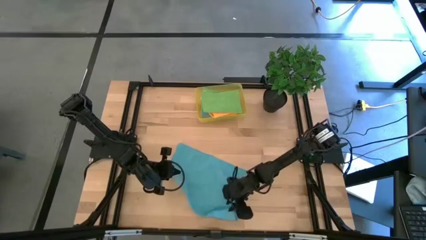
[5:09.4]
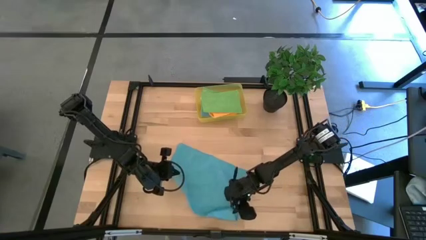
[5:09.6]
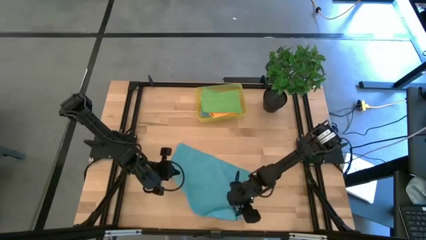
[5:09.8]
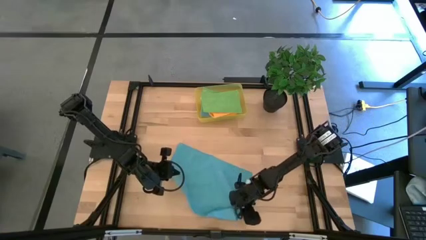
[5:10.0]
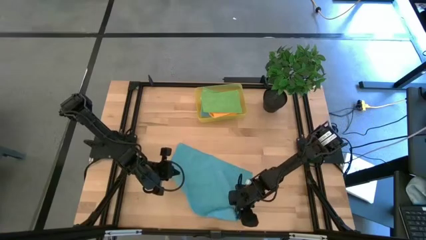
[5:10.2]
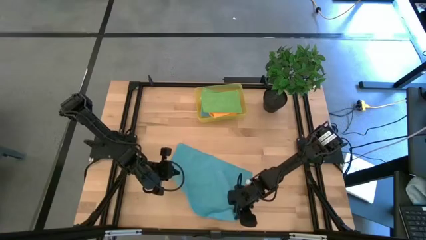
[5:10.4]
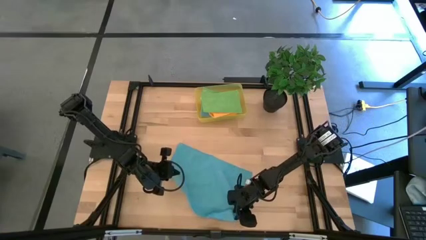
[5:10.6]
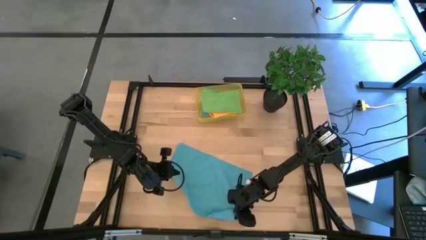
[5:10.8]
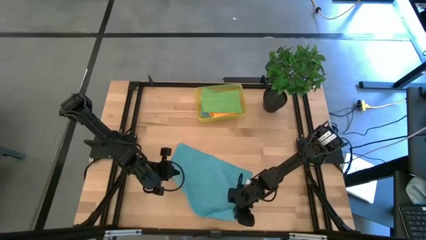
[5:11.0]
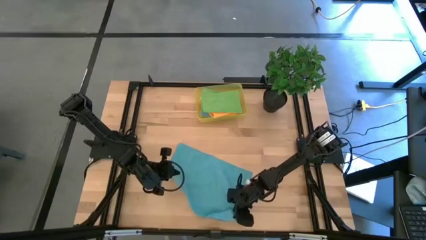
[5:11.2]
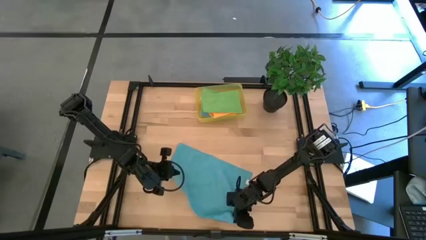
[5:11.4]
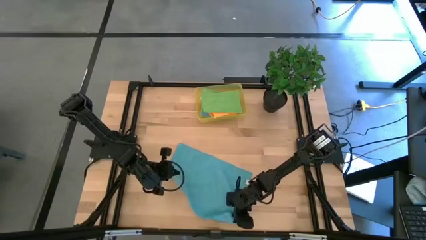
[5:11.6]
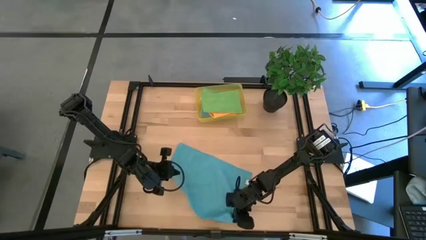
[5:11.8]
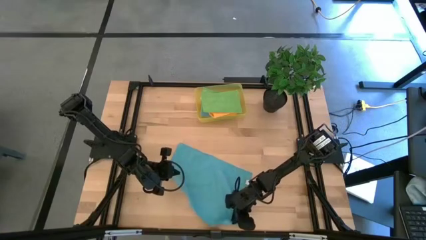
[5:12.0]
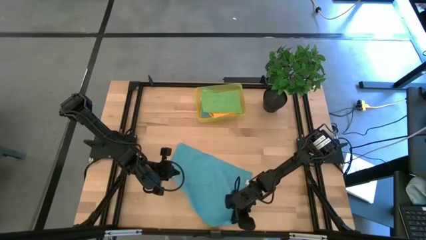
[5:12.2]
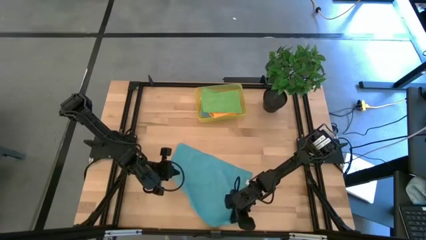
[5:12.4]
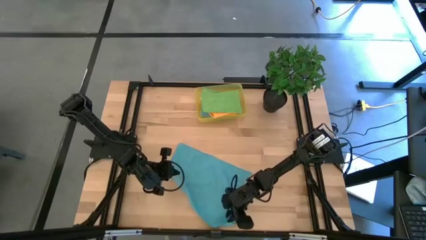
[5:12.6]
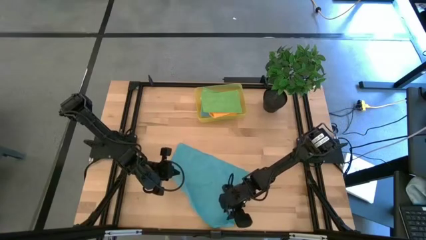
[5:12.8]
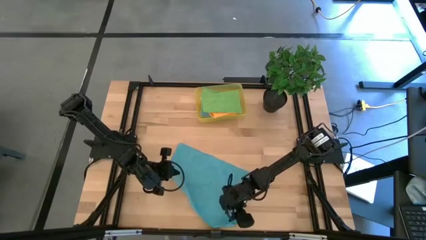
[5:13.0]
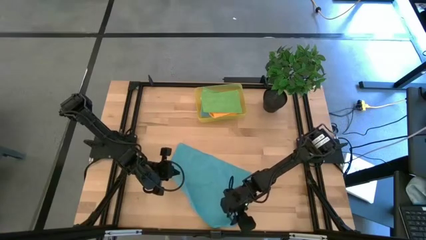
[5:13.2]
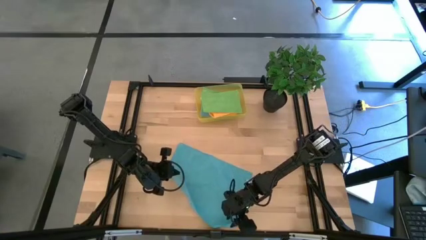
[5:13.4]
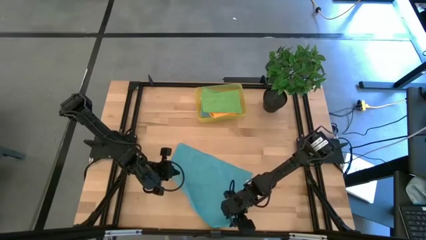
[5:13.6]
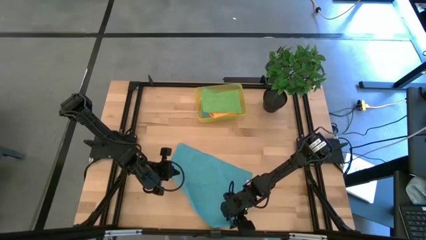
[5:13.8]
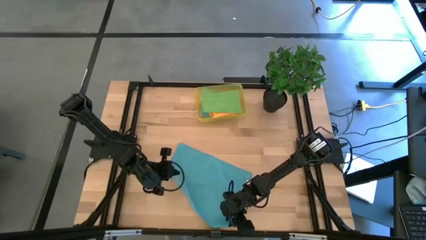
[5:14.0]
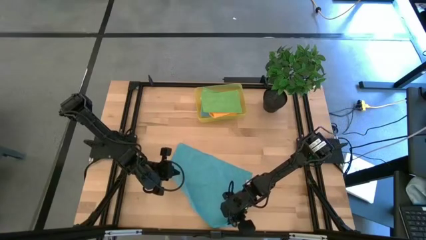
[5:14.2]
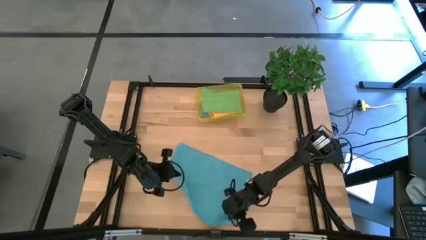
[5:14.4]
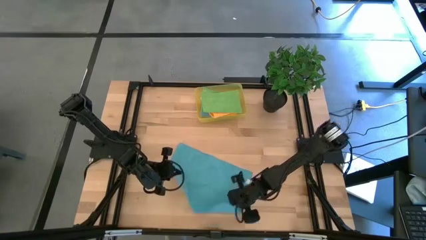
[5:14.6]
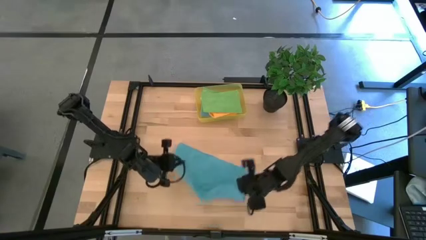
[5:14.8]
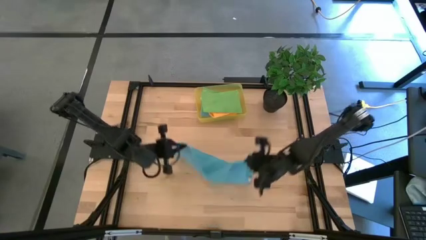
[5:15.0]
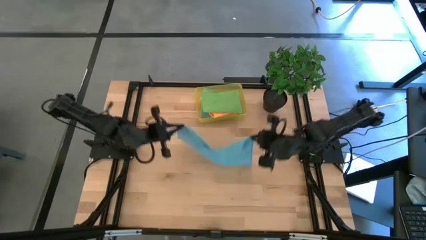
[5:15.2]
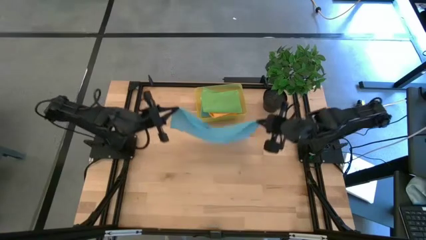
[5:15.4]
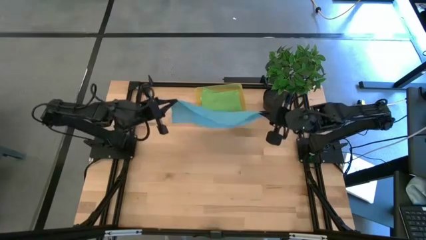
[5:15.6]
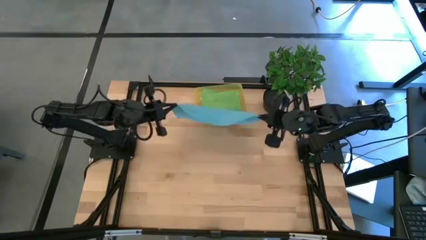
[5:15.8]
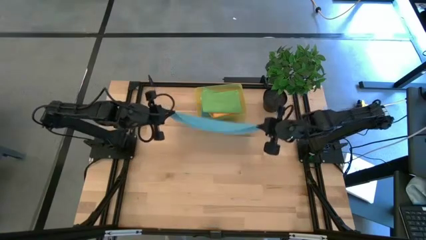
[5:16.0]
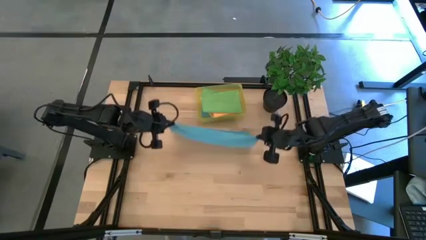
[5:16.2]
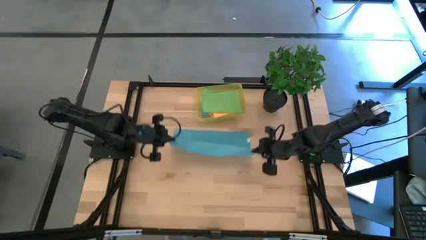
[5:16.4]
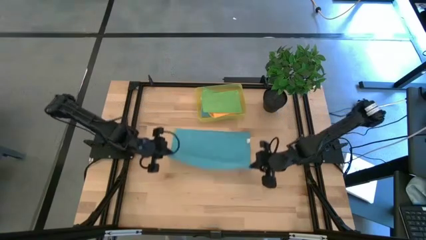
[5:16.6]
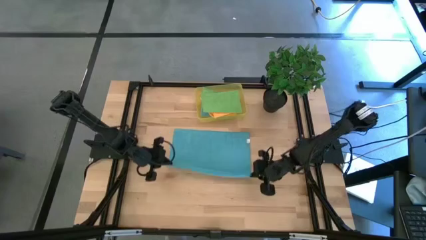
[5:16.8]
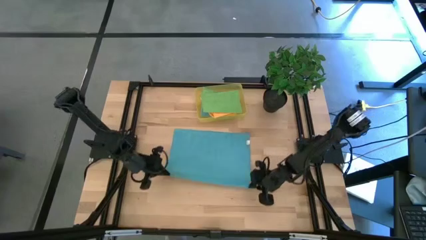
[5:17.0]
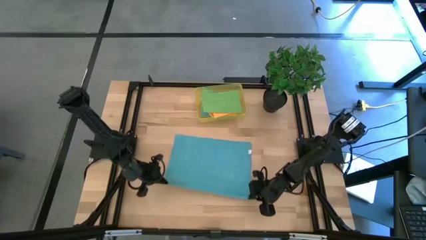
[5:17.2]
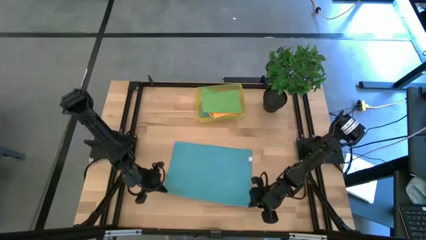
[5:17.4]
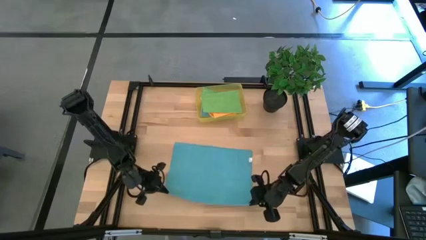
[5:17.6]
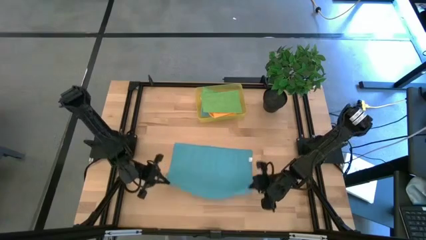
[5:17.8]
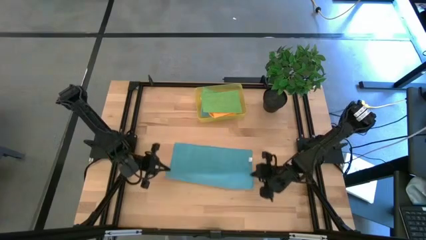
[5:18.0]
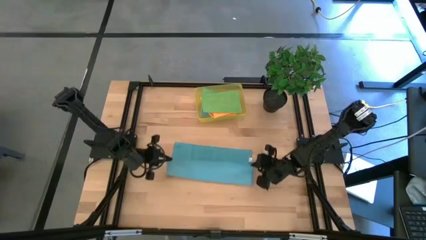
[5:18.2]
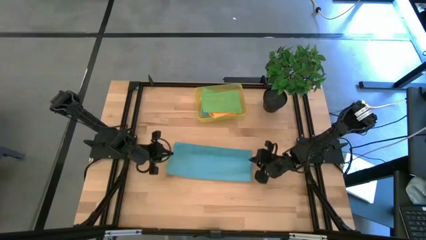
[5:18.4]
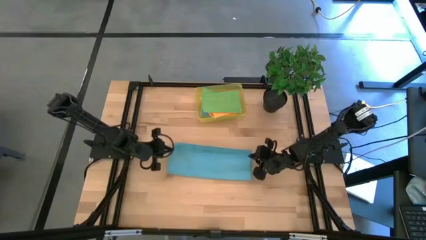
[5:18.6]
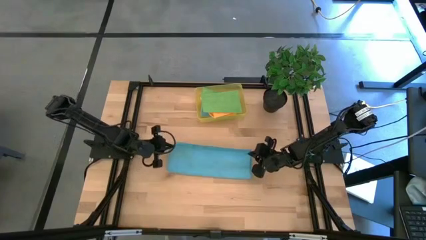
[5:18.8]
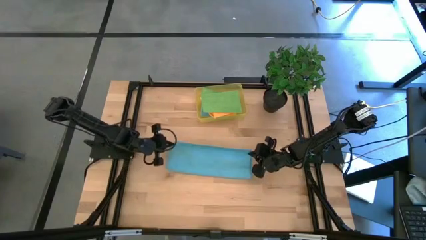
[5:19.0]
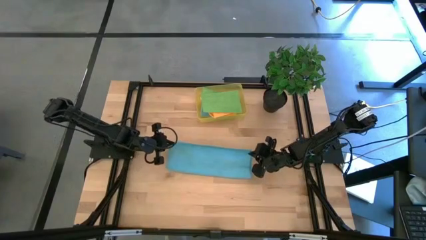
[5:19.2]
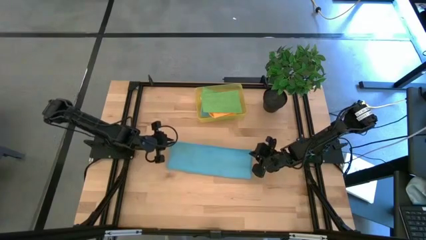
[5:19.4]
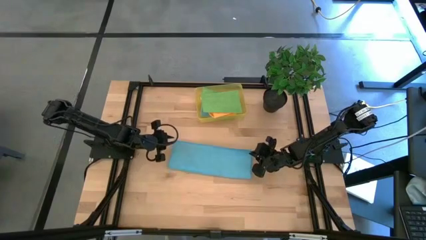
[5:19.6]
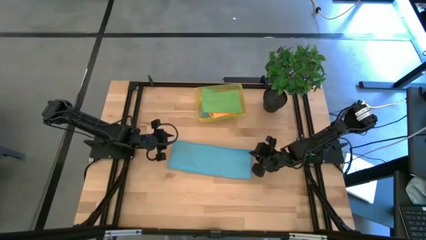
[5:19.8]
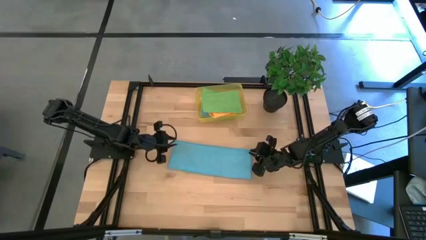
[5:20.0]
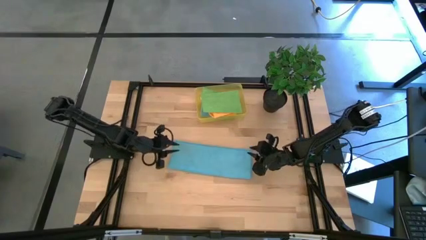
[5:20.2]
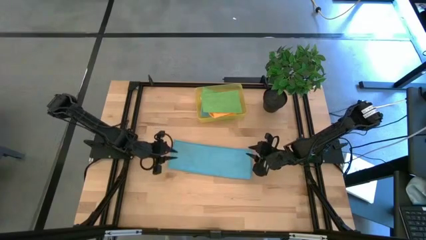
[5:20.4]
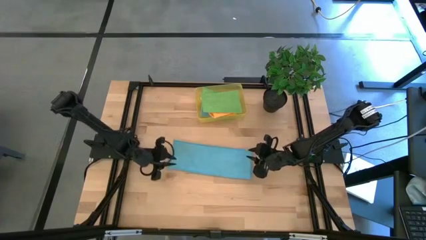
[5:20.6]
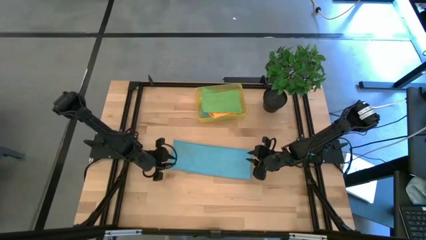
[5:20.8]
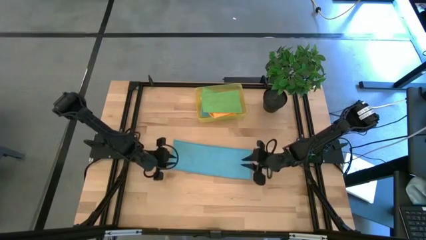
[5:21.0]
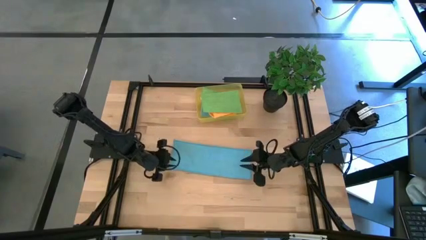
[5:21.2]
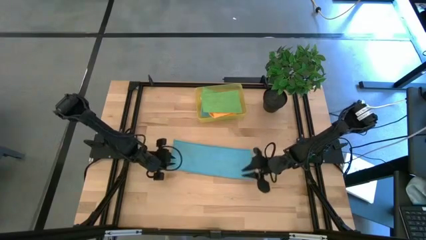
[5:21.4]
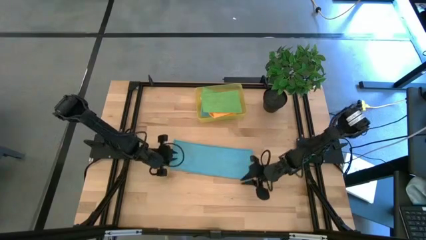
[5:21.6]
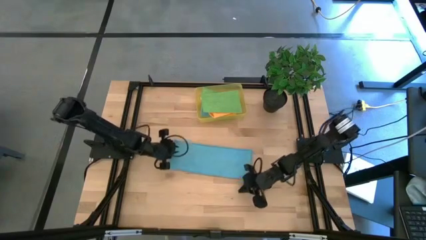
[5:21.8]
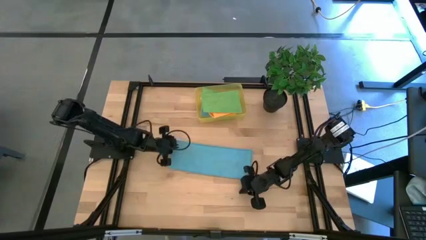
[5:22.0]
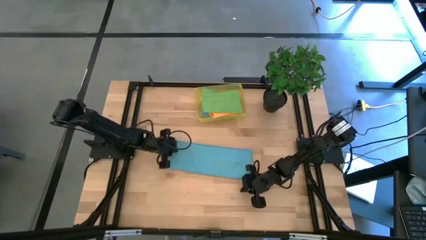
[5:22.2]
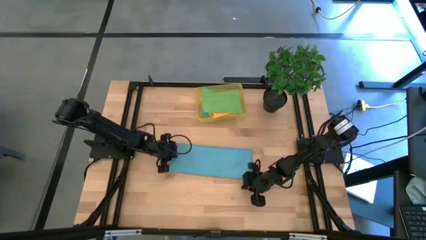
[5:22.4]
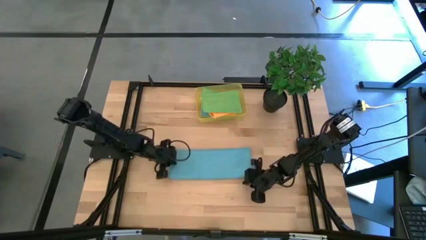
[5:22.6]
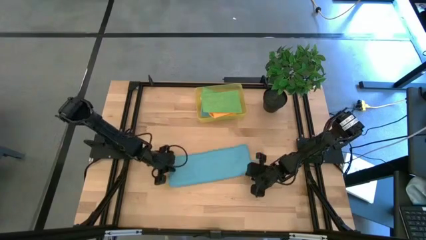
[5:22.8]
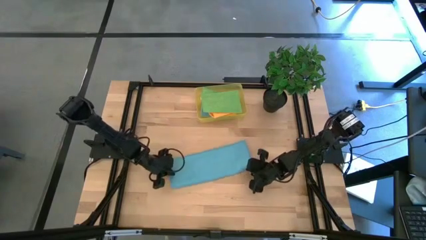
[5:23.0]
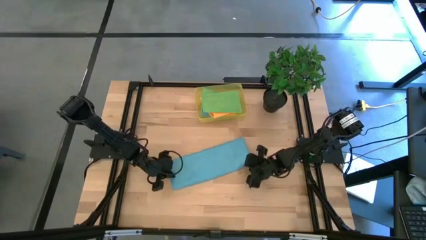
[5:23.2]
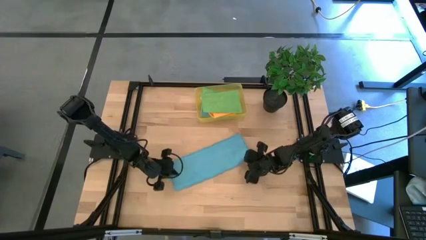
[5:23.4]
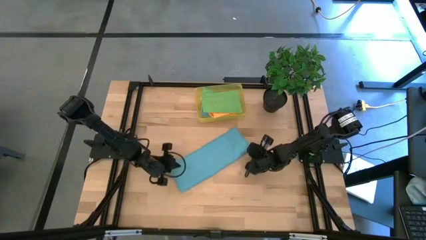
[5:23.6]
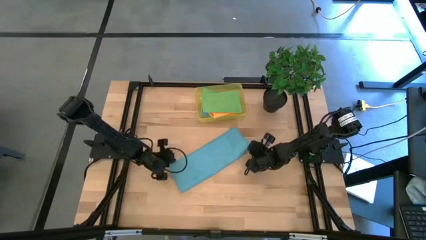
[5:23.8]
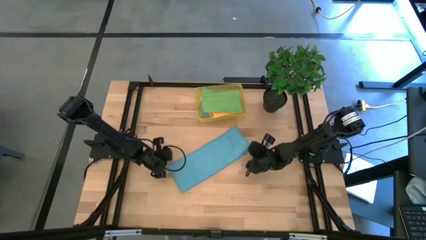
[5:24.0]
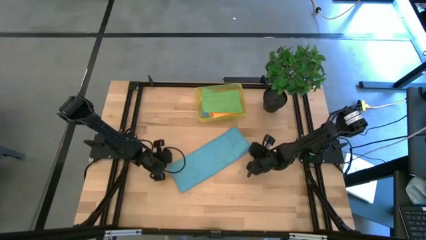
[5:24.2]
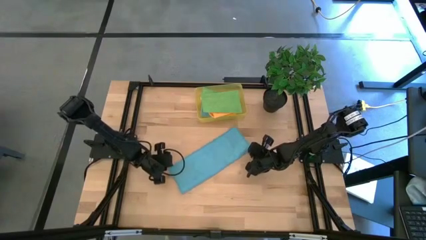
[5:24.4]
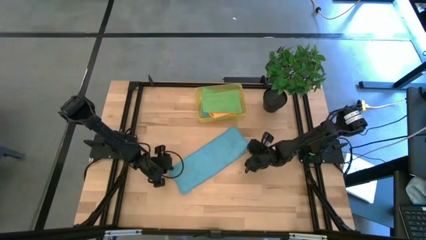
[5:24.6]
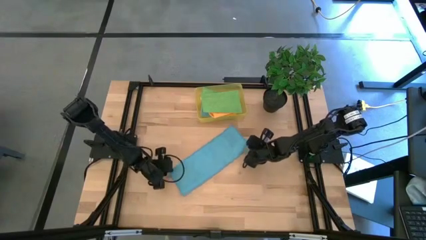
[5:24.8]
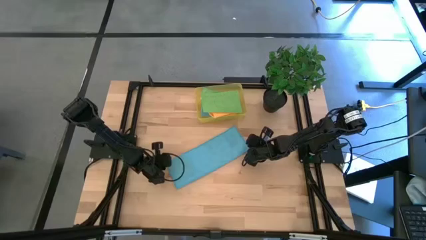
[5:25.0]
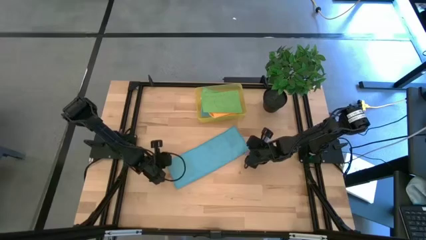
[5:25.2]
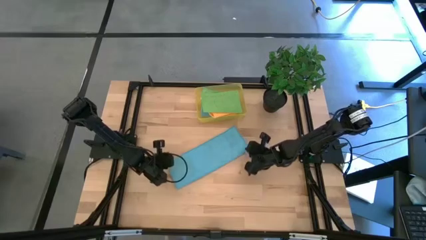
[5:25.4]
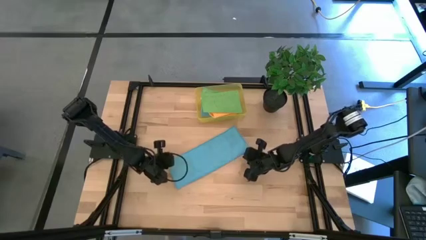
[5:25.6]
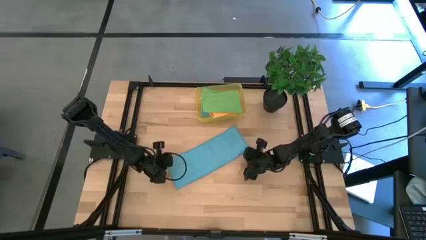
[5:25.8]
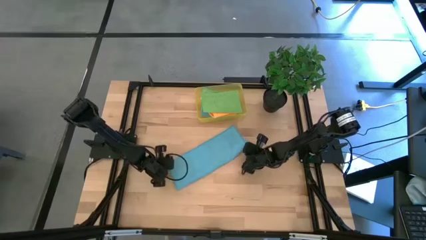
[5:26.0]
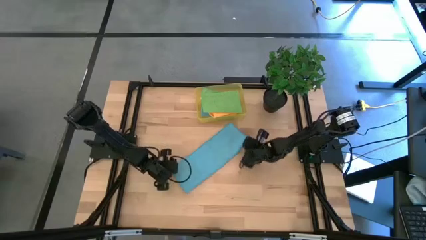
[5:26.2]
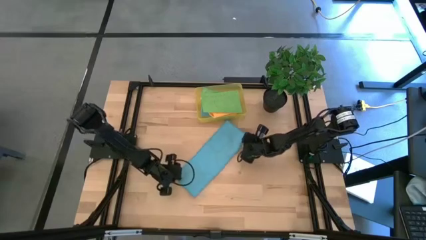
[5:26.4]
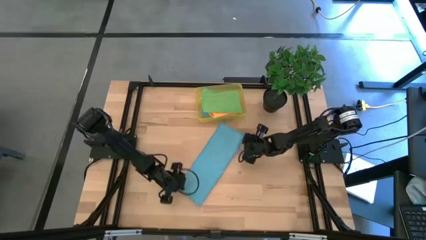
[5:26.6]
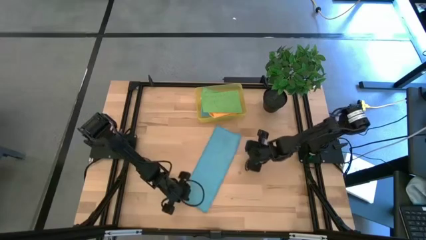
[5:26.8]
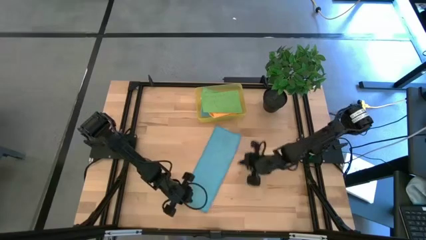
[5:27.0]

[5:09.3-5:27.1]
Task: Fold microfiber towels
Fold the blue microfiber towel
